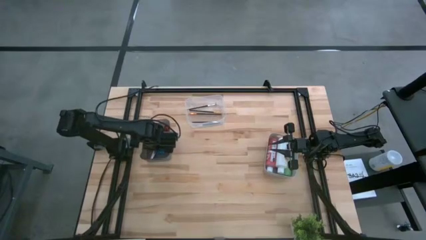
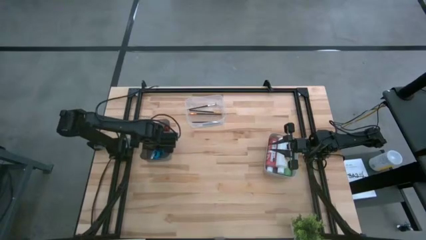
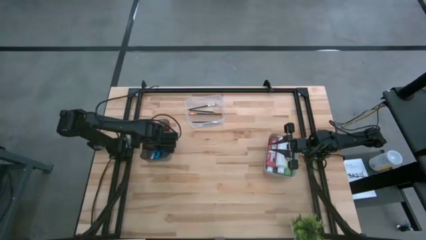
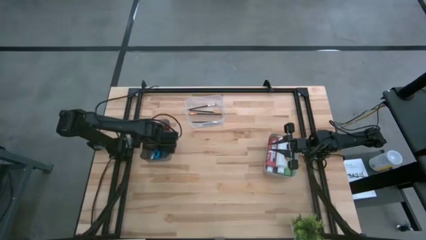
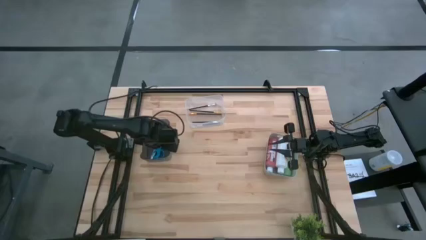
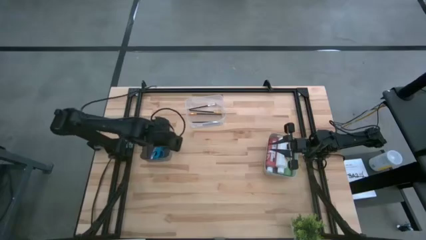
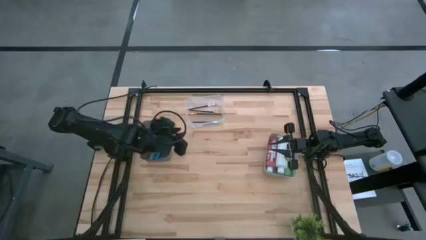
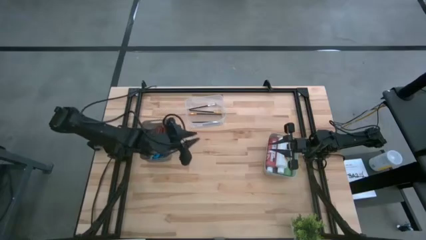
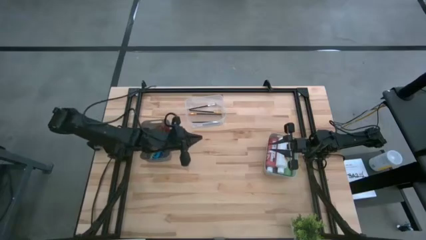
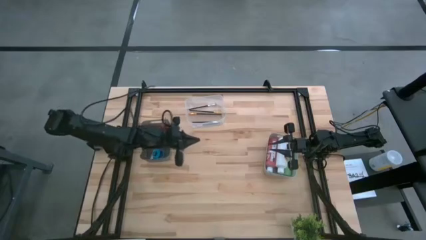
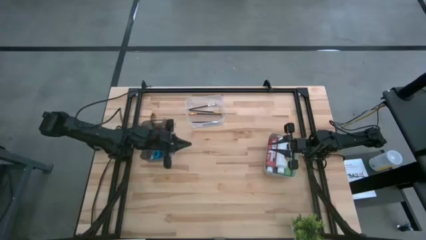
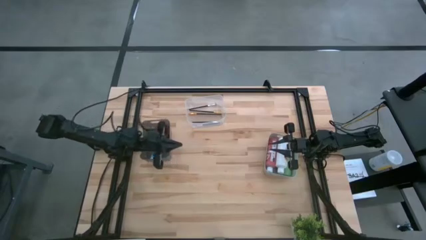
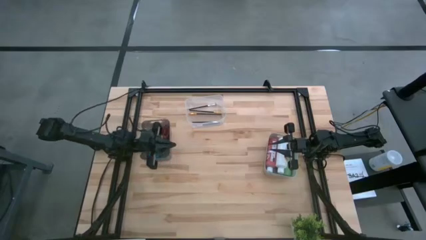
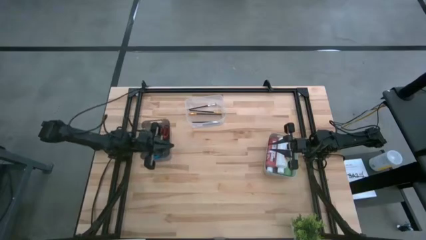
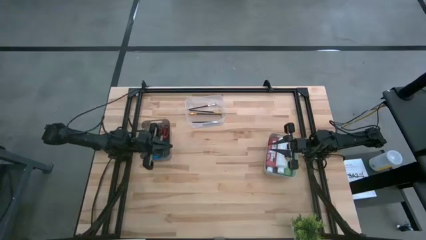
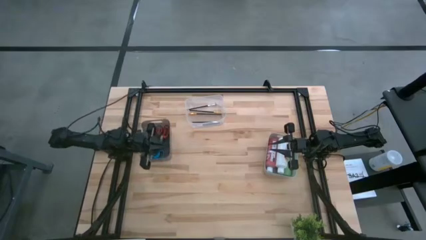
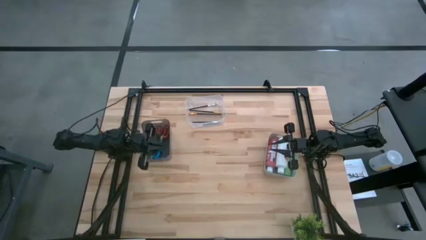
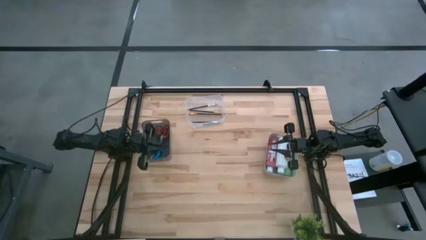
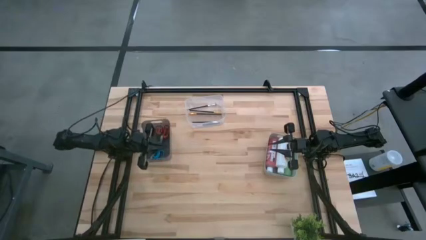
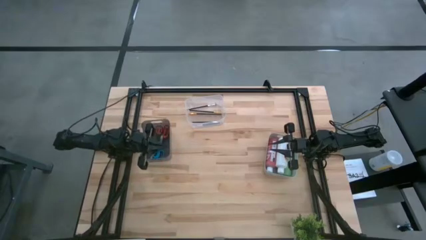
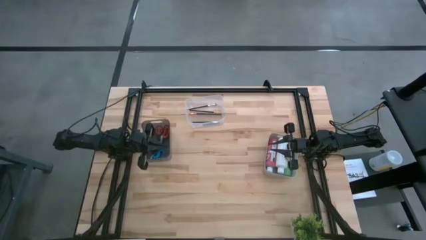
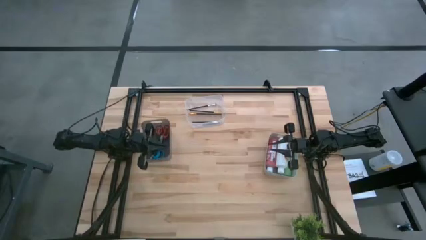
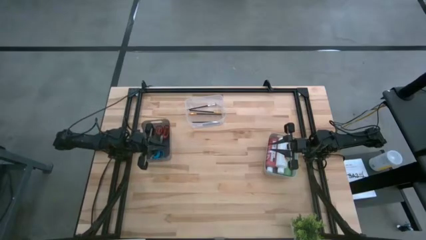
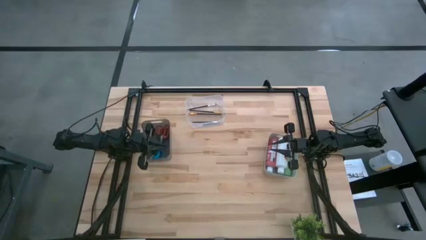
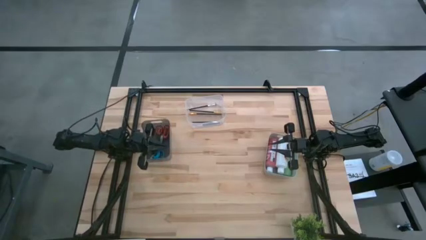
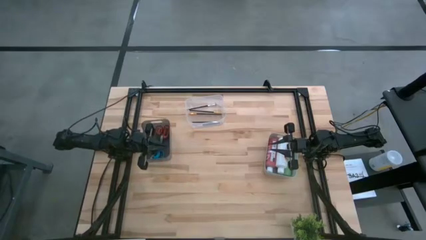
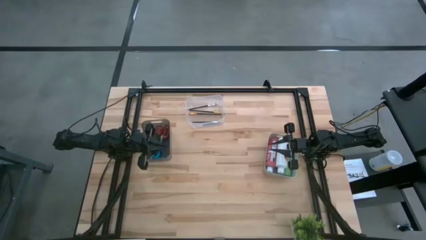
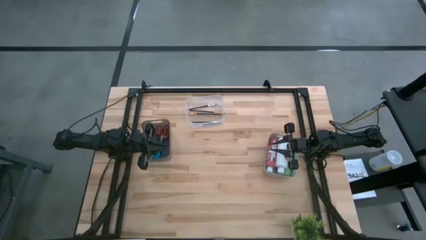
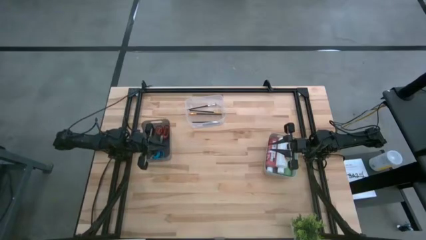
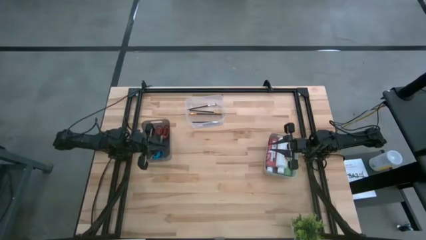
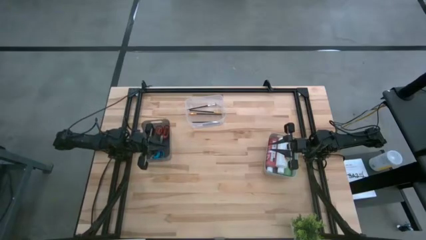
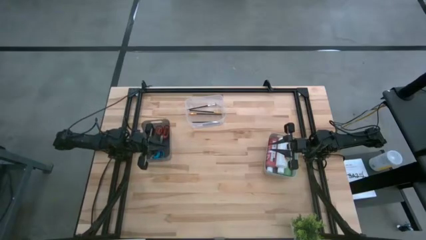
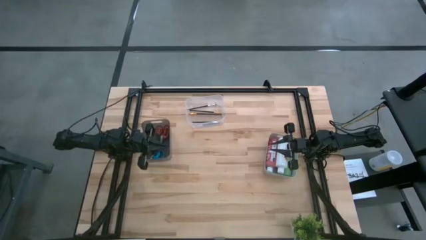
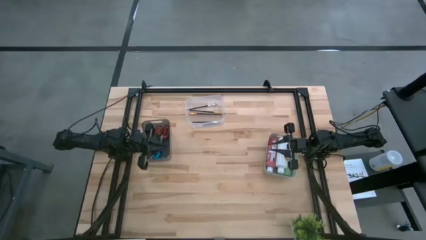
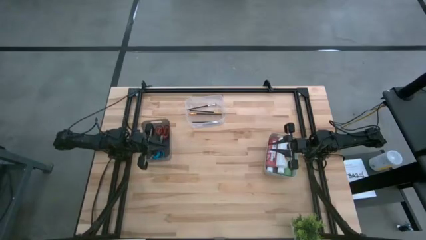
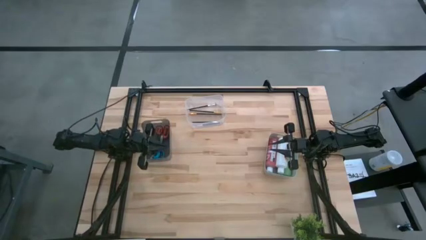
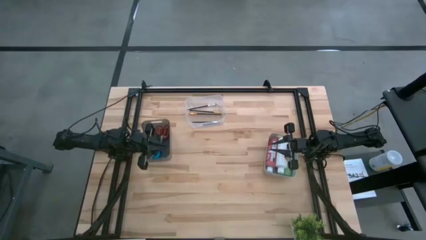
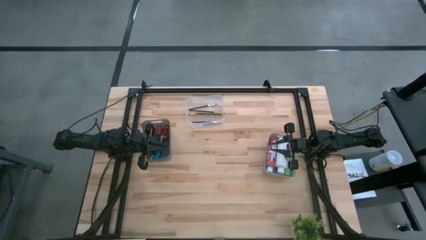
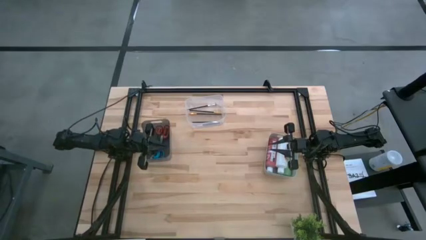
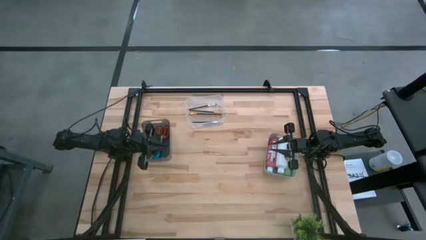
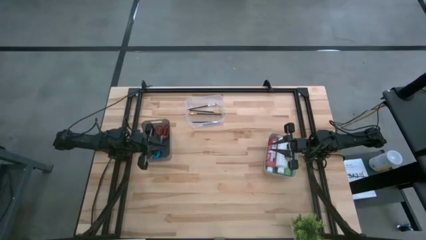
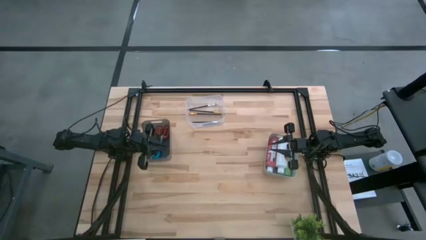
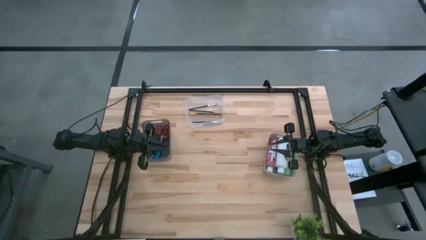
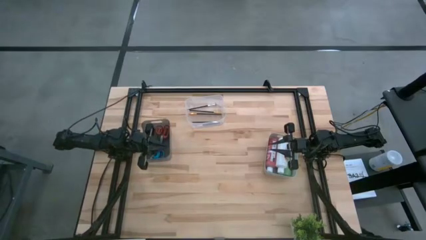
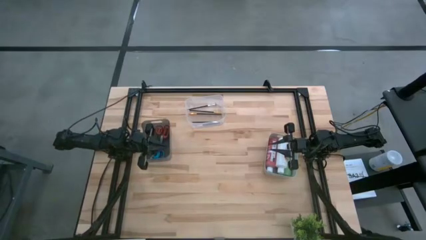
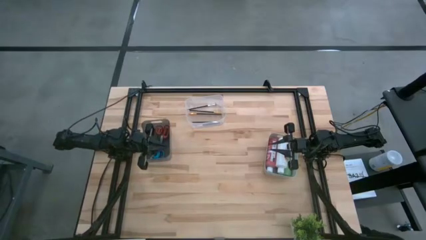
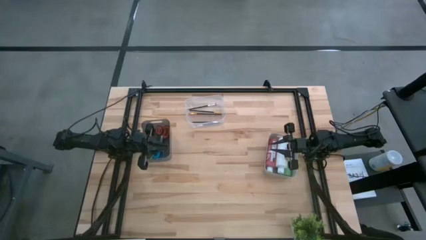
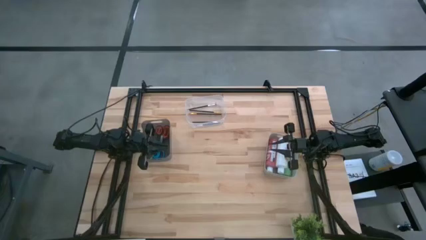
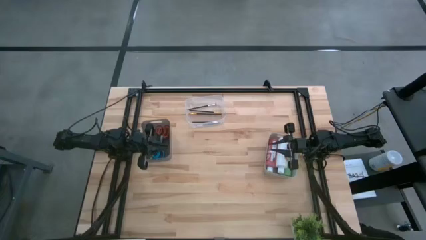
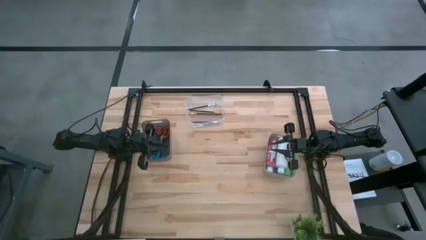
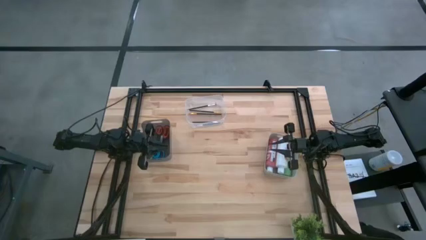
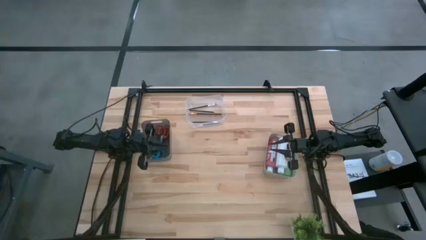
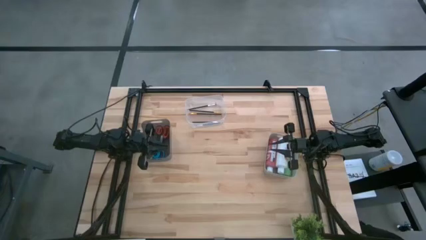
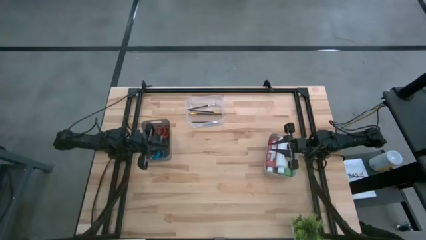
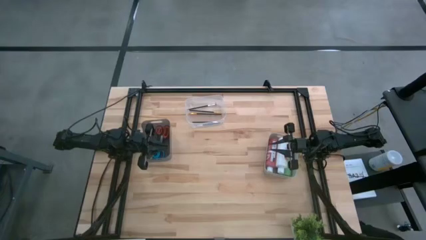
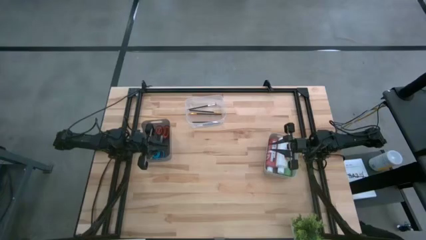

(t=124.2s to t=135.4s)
Task: Pick & Place Paint Supplies
Return to home position

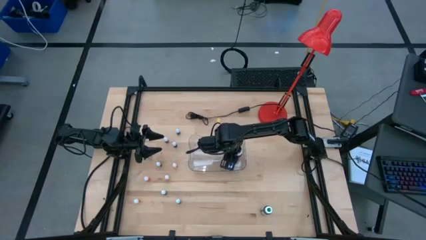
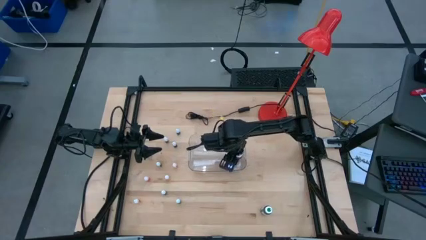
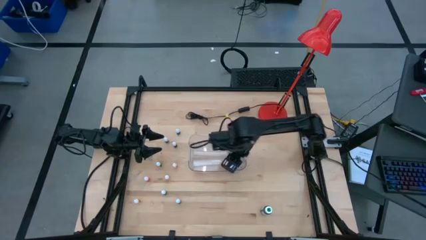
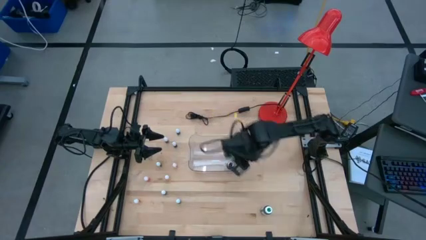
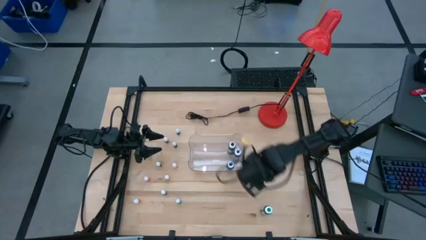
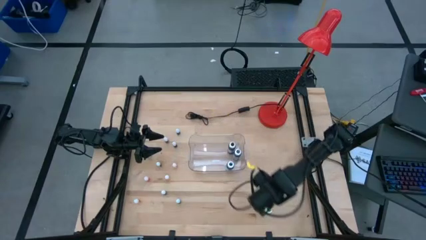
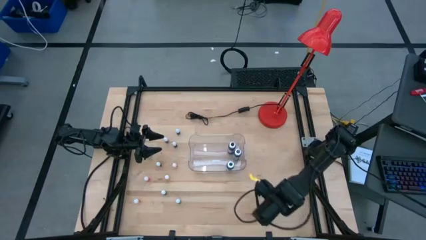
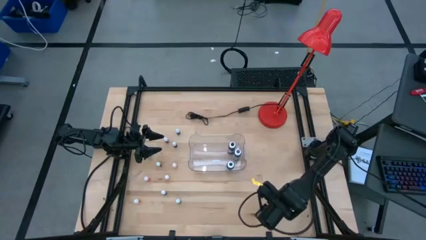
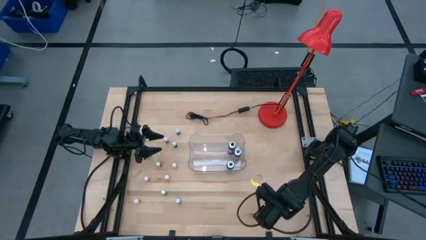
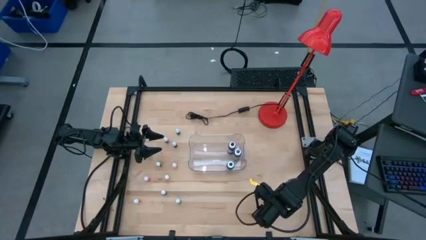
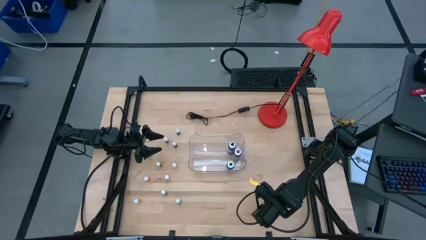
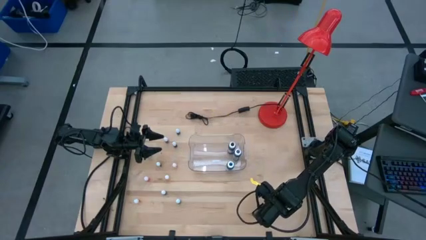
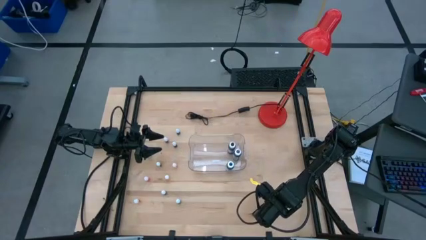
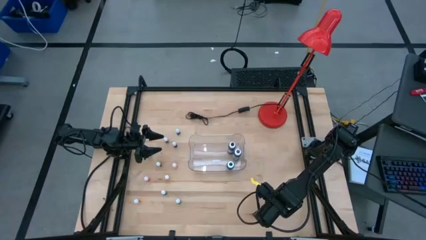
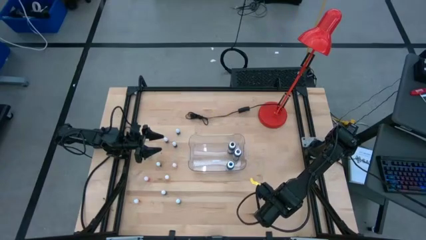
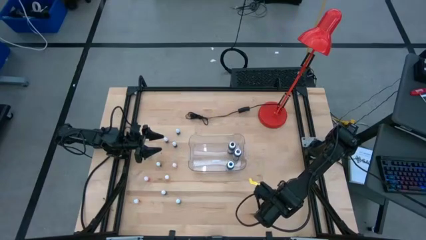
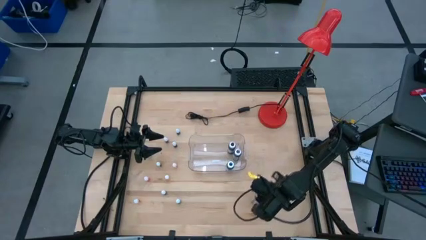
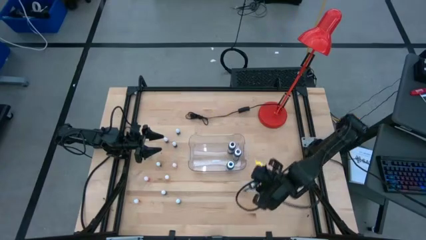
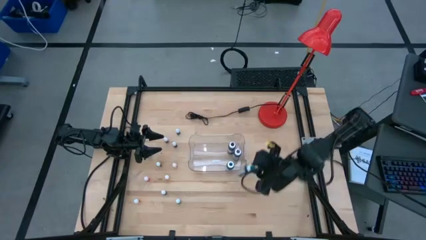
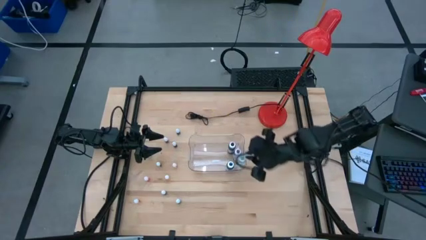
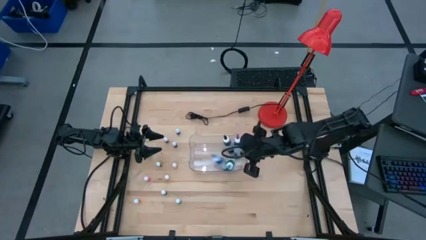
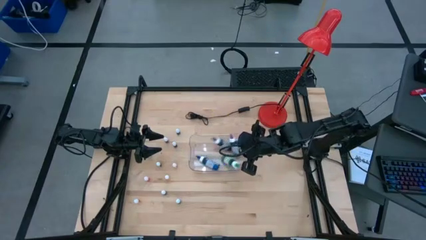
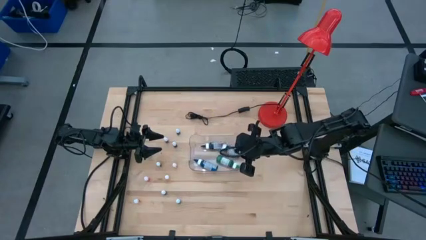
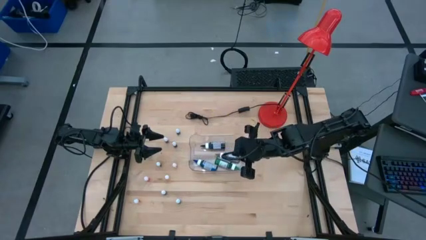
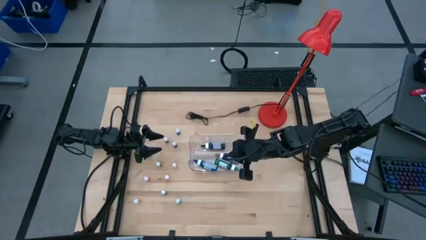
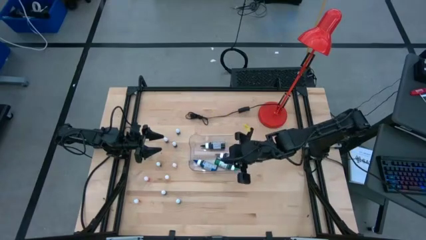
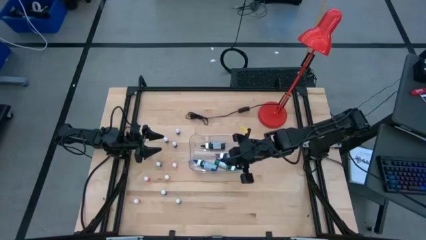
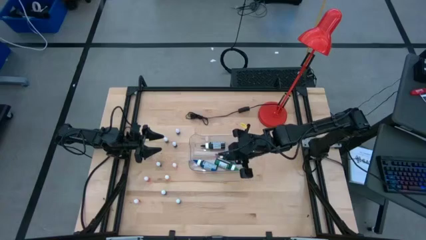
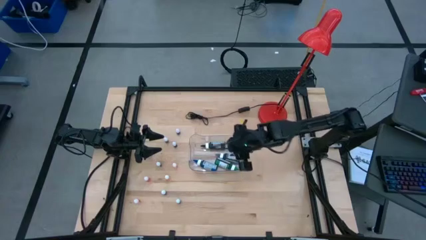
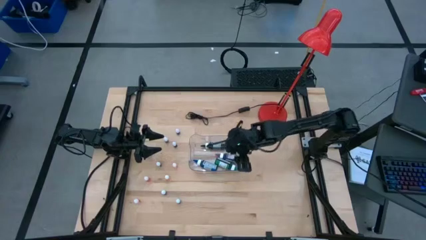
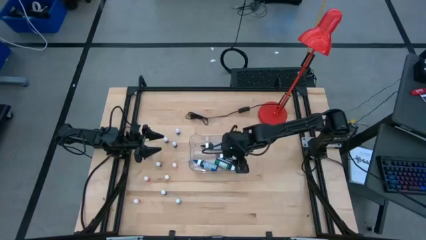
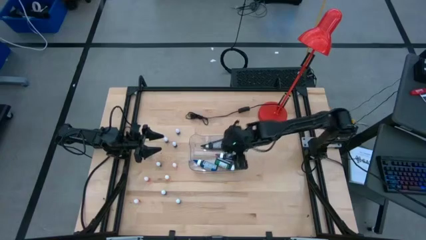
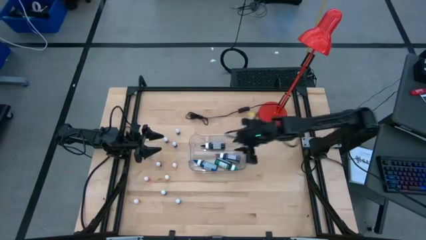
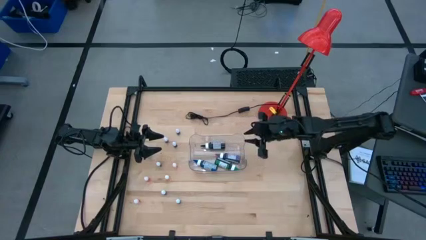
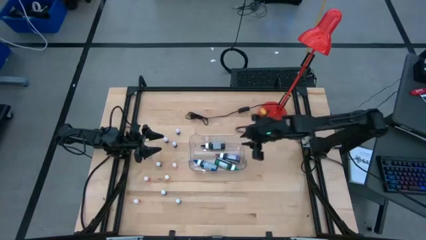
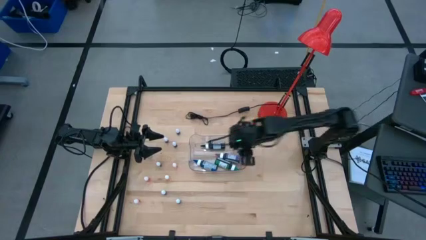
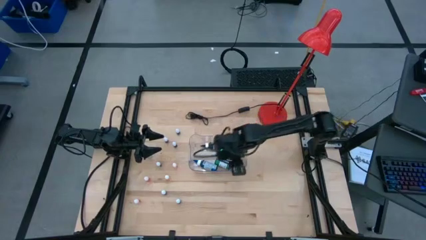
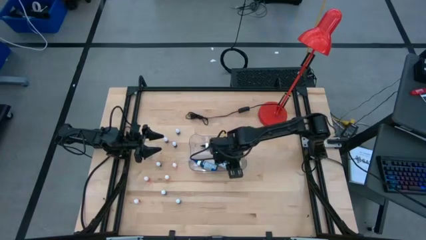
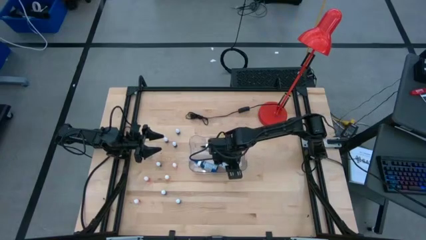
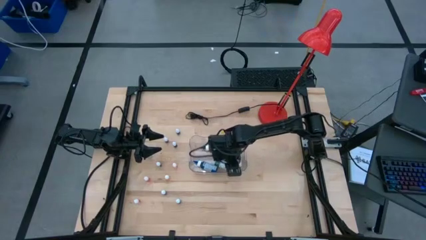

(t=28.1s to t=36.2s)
Task: Pick & Place food coloring
Put the large green food coloring bottle into the transparent bin
